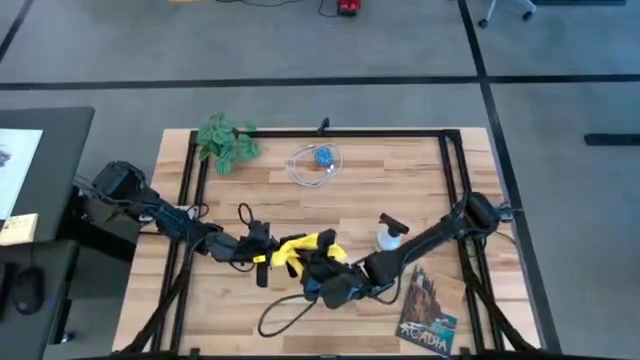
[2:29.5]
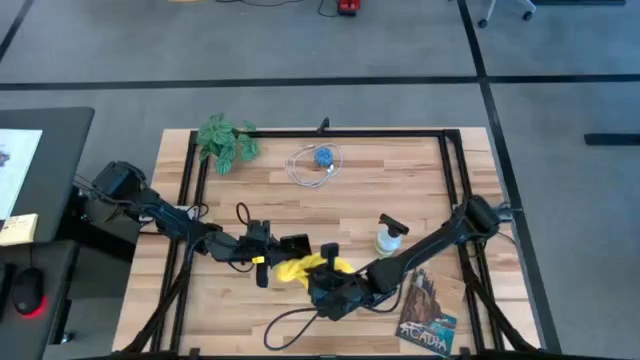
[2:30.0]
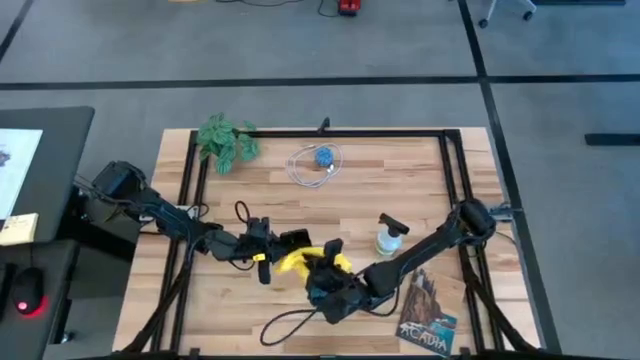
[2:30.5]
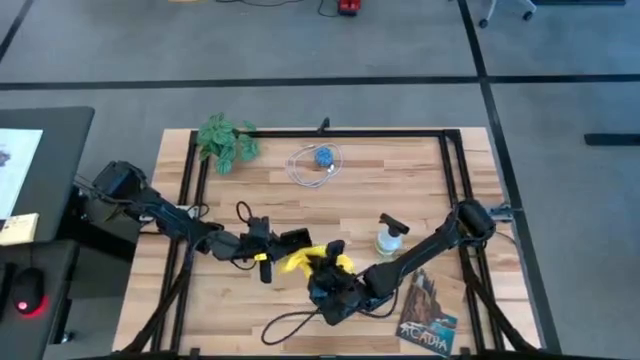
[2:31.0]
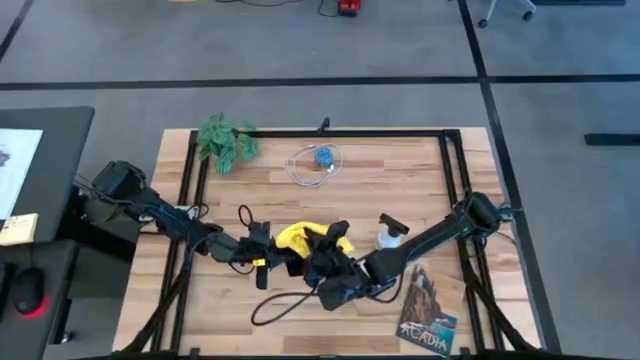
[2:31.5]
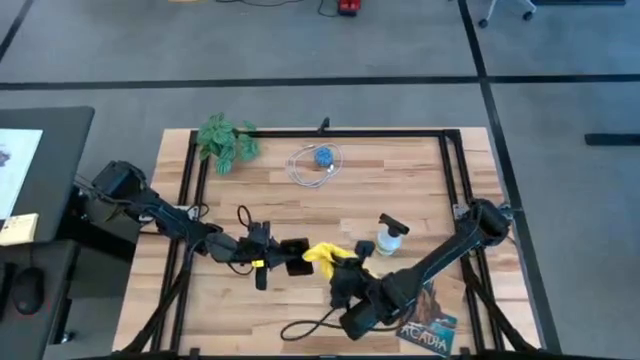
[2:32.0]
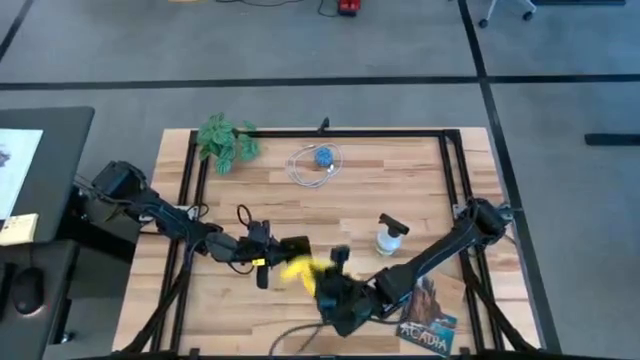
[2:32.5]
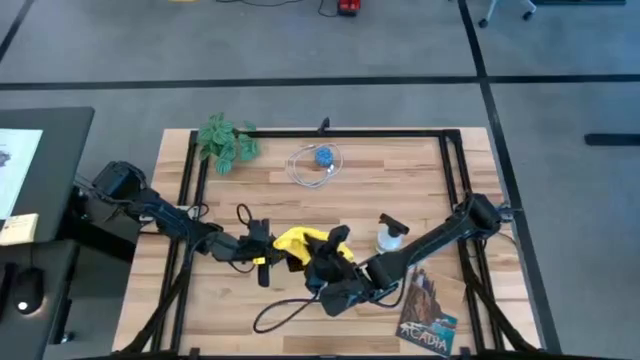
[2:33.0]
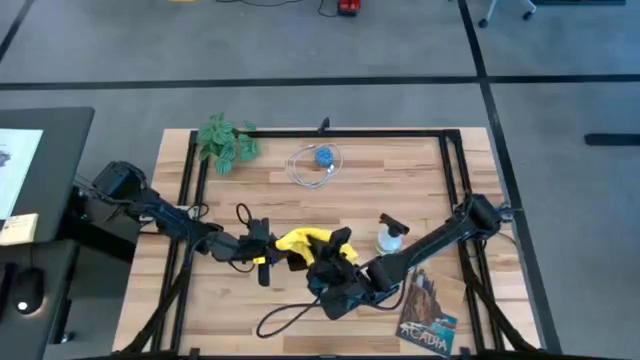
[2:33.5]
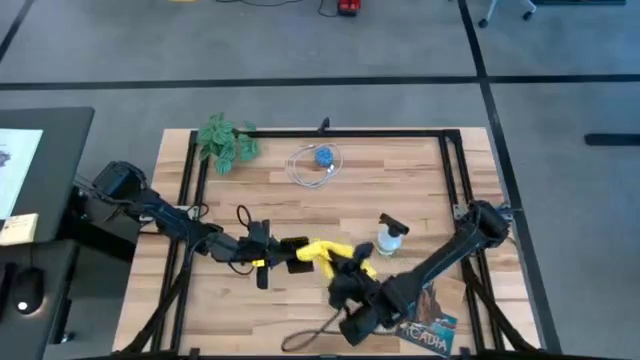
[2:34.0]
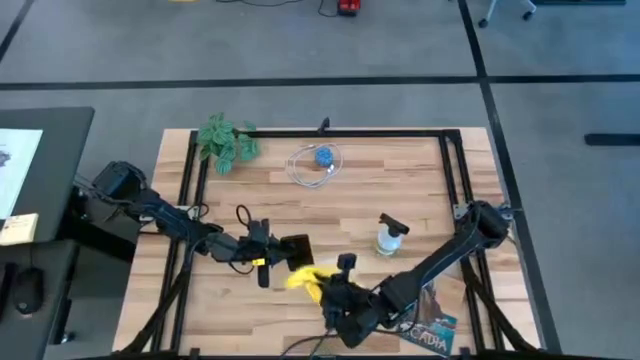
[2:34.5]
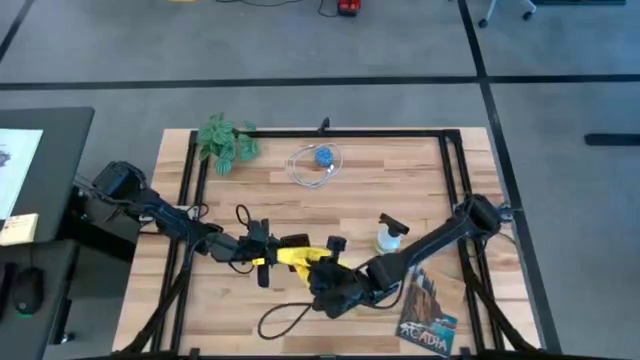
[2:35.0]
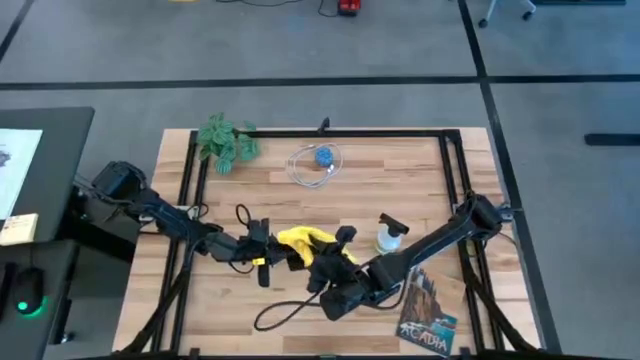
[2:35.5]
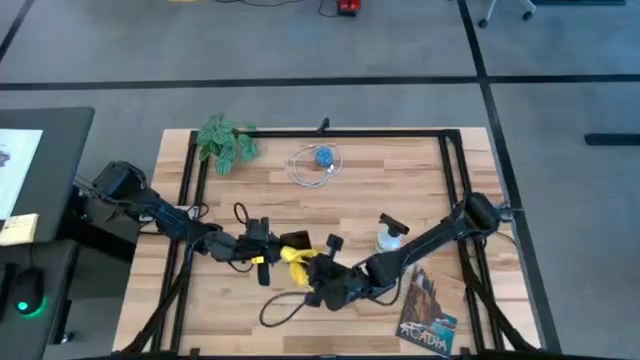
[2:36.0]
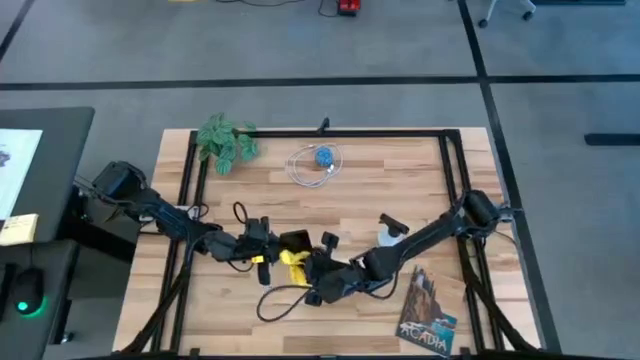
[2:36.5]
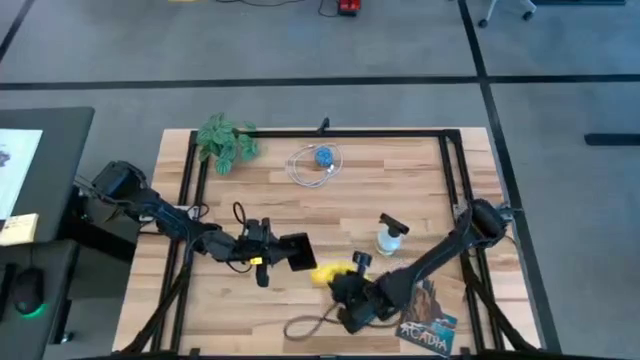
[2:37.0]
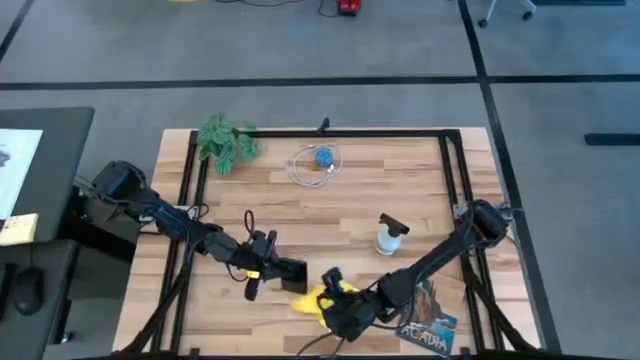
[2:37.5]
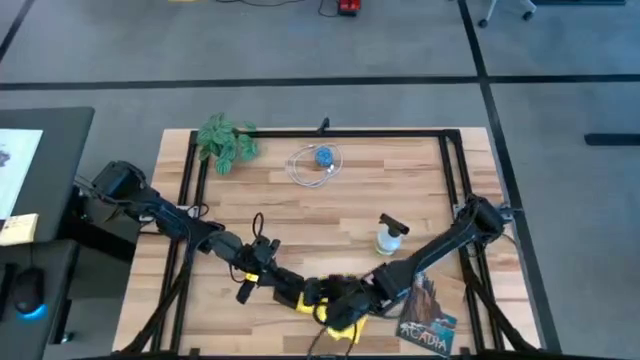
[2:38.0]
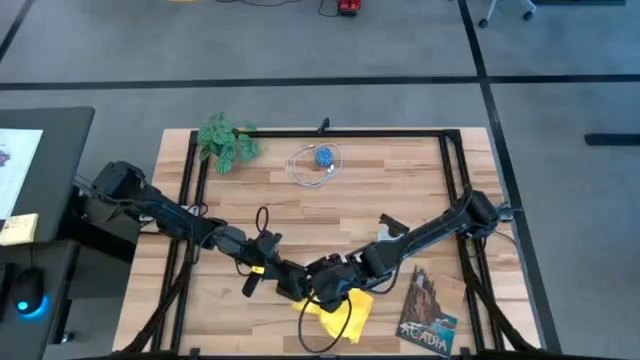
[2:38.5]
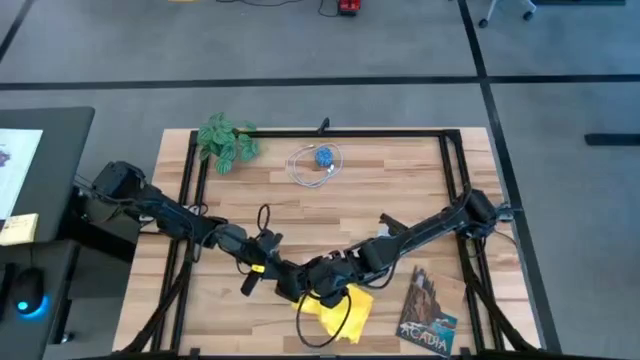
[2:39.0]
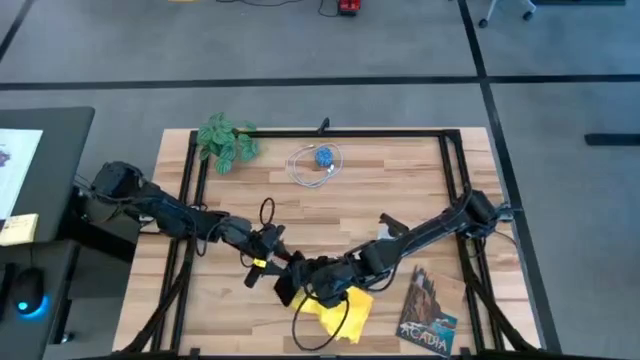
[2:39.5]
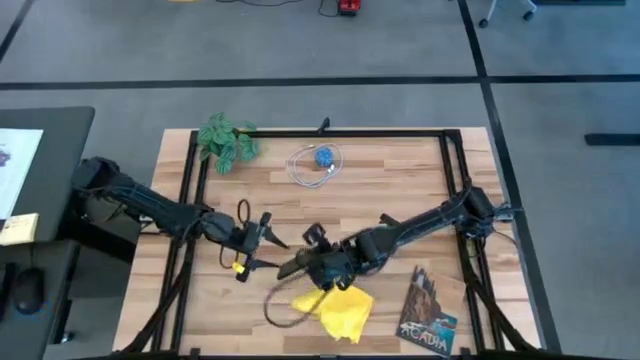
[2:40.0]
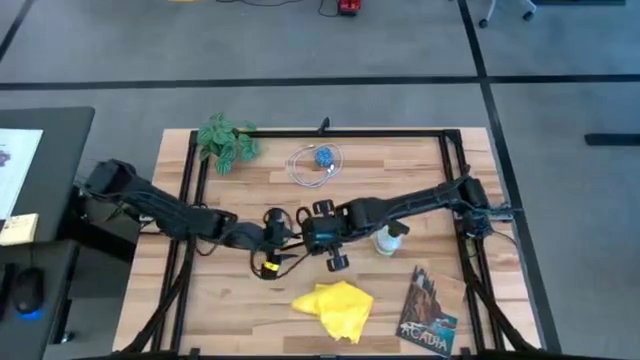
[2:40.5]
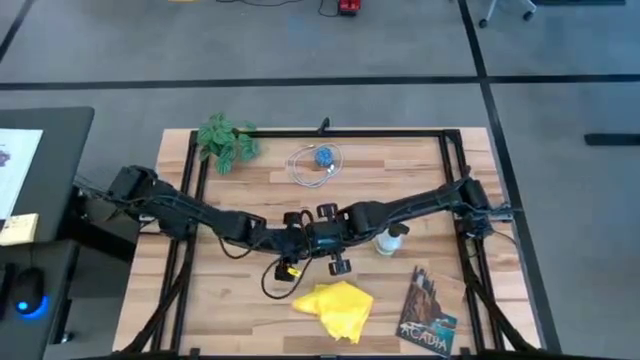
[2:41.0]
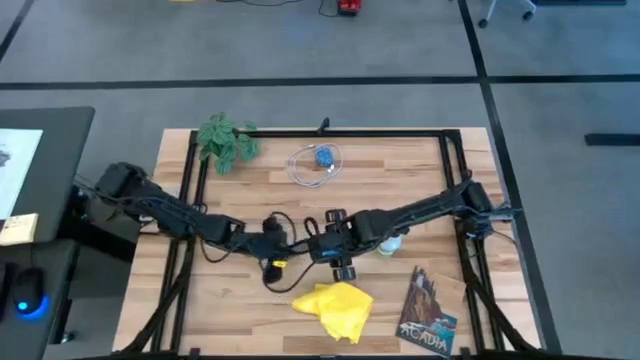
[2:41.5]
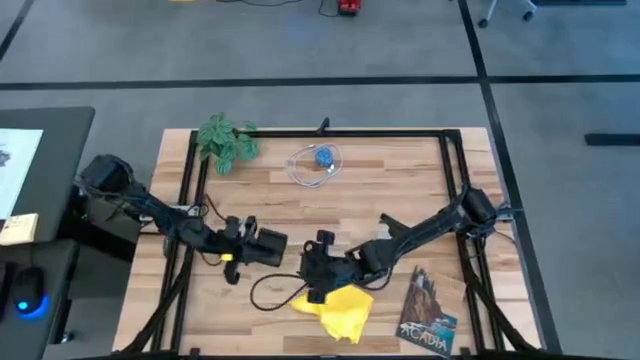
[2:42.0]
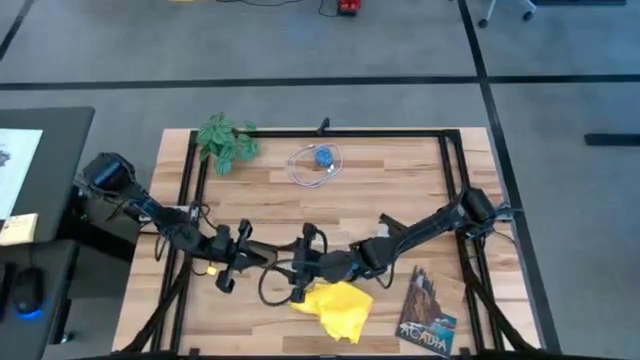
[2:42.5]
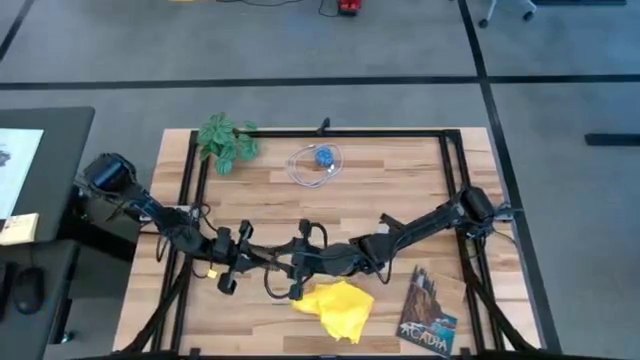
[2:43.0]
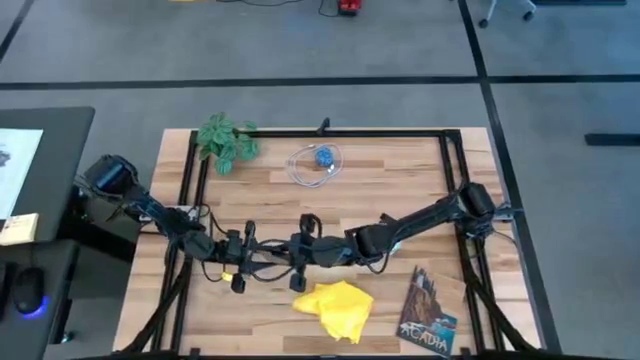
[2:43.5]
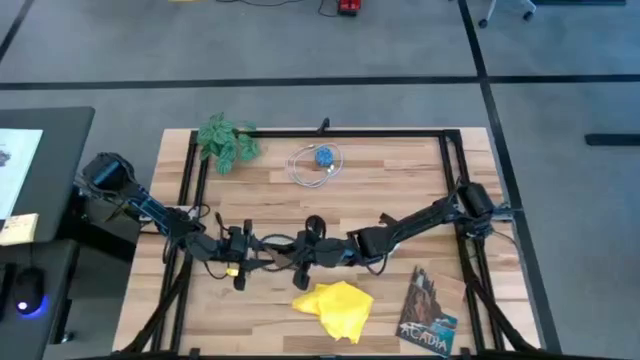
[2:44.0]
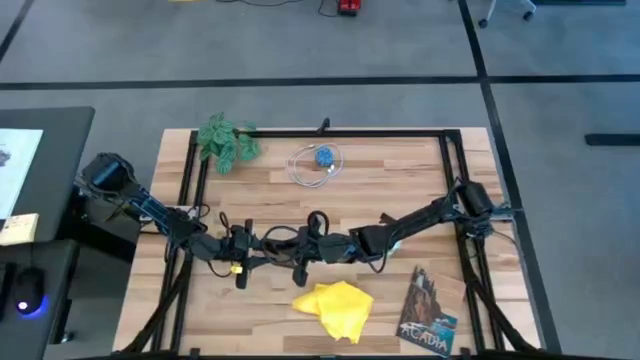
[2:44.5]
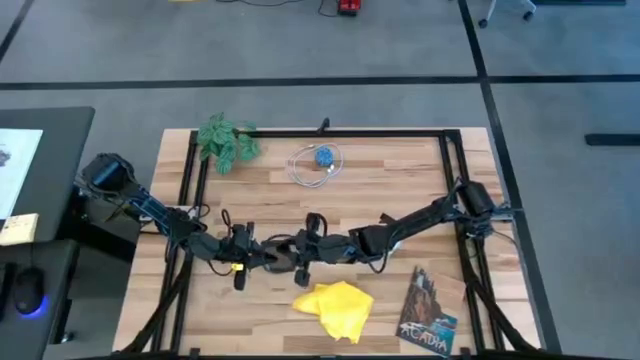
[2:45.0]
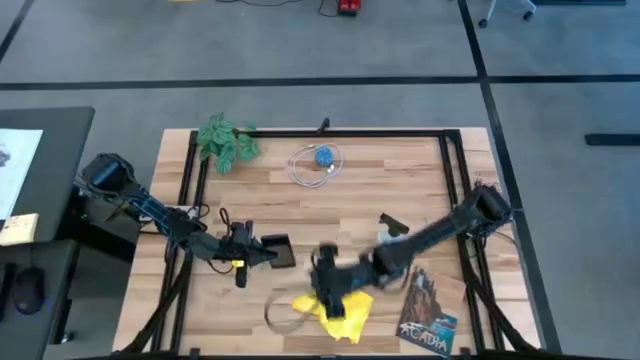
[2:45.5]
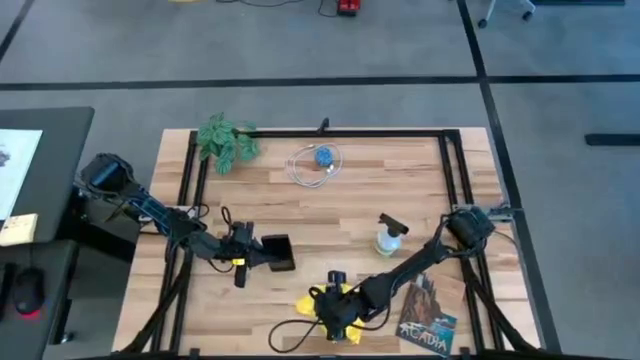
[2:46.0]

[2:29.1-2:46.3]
Task: Apply microfiber cloth
Wipe the back of the cellphone using a microfiber cloth
